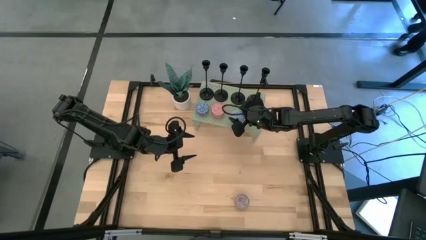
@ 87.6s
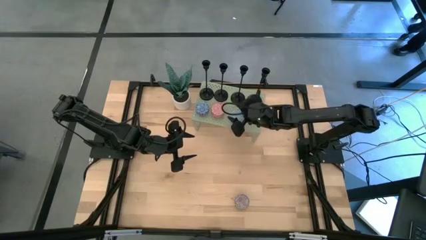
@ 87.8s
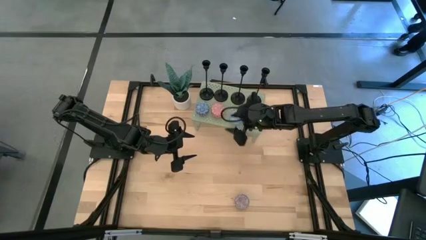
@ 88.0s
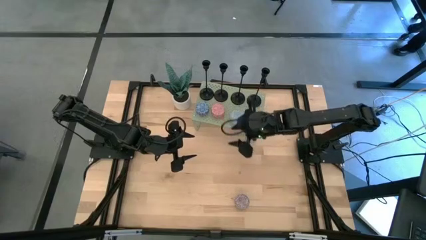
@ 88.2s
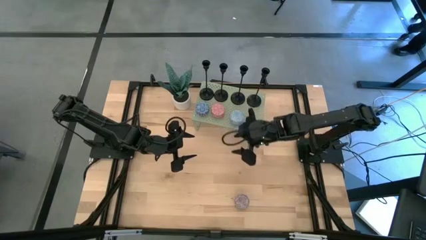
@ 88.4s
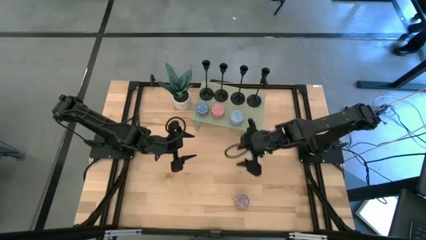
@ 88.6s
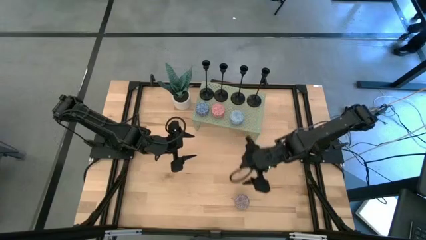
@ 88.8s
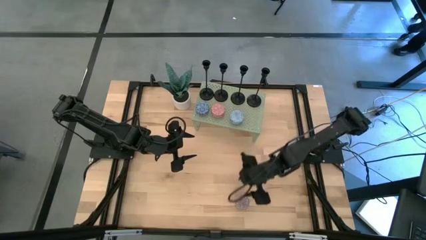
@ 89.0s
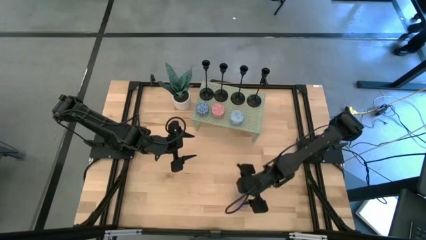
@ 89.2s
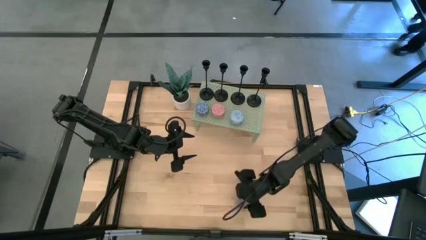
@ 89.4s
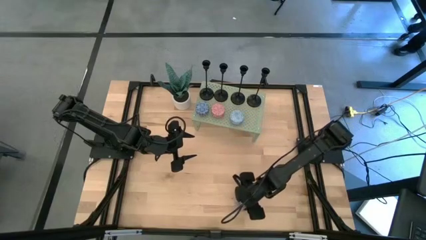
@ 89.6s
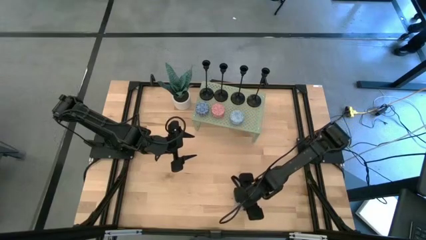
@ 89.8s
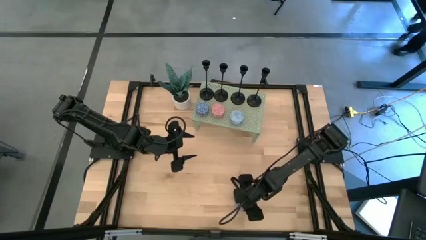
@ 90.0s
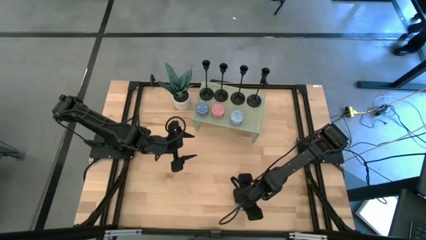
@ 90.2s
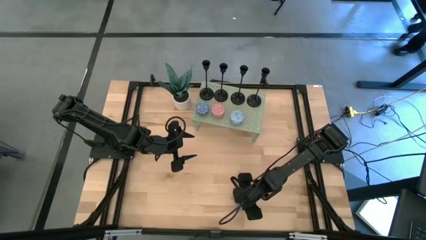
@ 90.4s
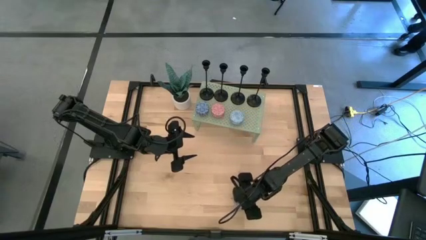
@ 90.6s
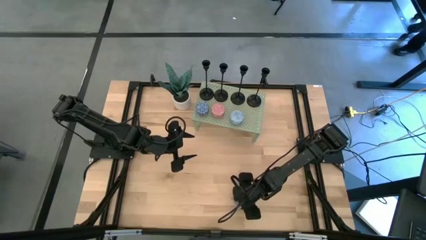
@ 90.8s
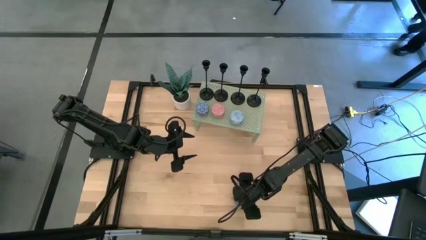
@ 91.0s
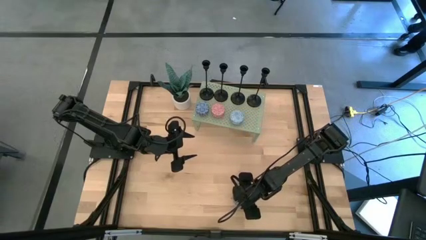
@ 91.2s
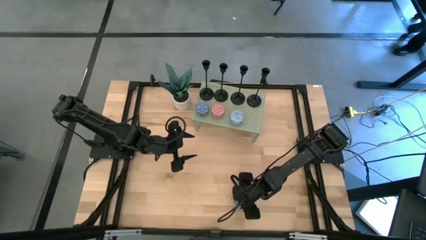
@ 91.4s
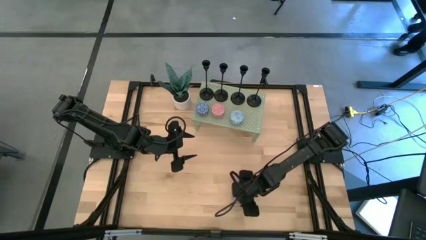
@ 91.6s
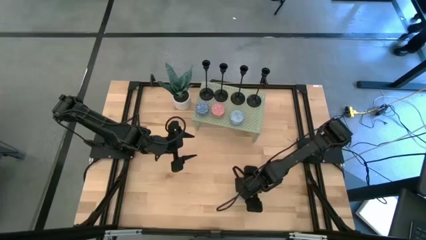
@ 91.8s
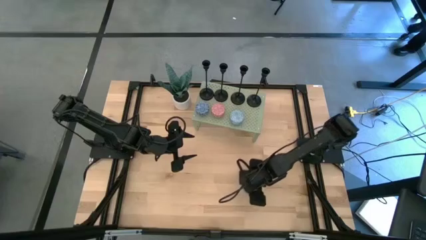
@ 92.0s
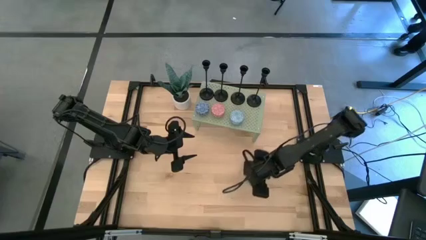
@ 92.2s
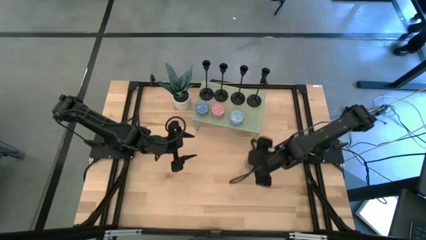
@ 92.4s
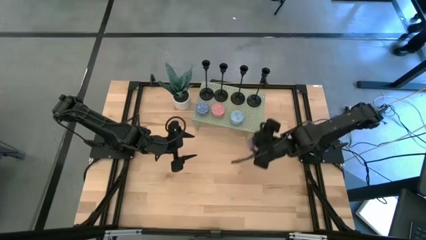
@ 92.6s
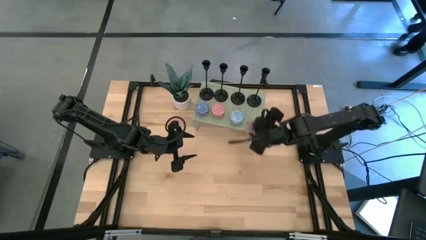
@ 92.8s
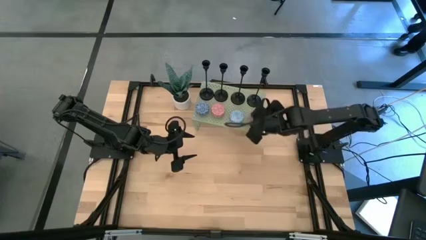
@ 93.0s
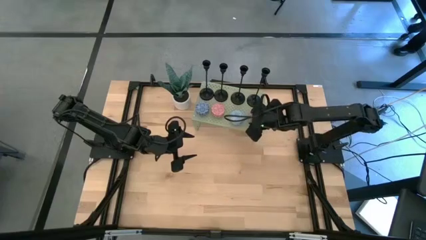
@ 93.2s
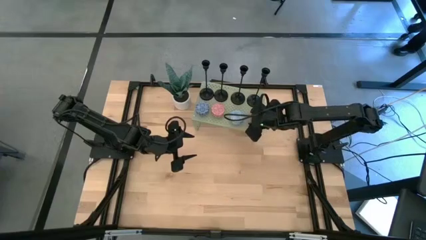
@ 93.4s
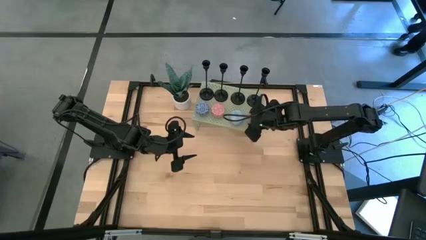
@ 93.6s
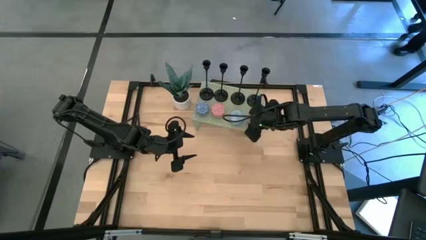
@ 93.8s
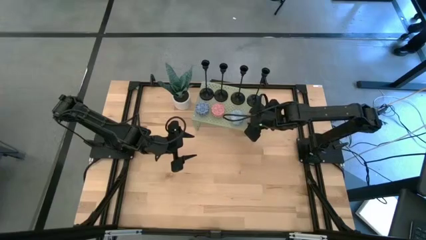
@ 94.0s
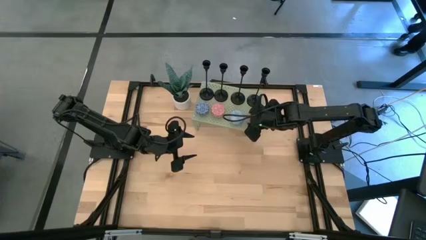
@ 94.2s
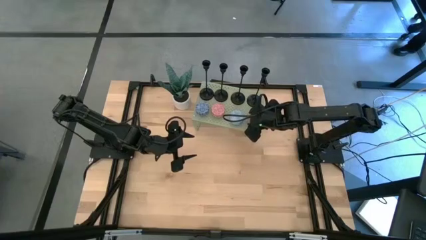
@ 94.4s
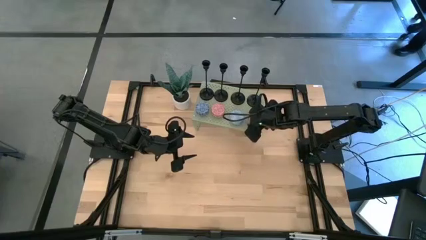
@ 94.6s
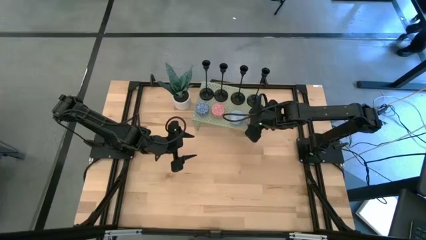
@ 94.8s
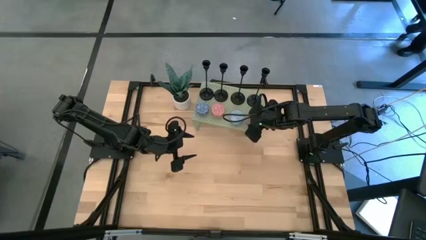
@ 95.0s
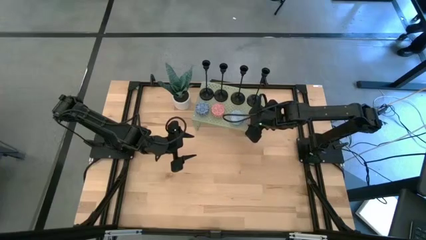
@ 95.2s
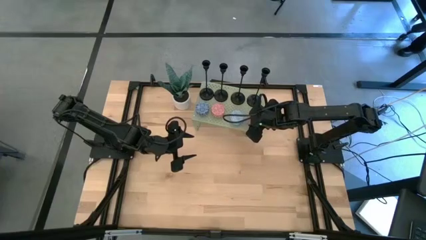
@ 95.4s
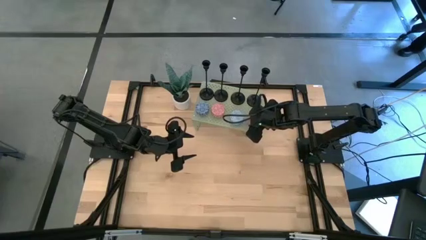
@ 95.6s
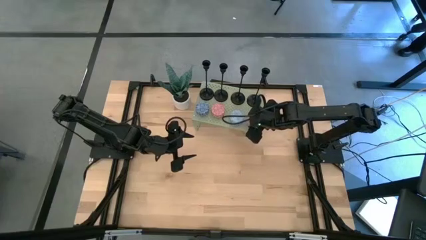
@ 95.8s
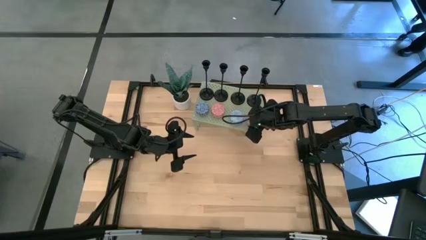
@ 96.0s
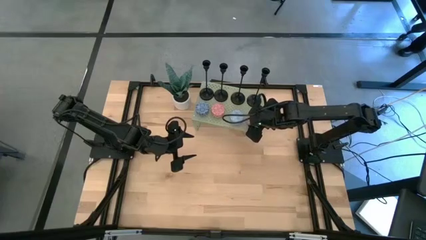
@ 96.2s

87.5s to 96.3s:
Task: Pick & Place candle stick holders
Put the red scented candle on the shelf aligned with the other light blue scented candle

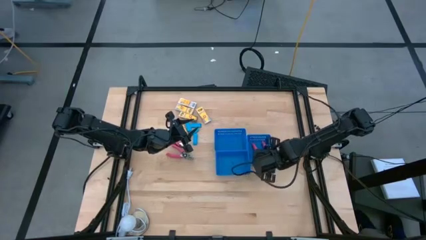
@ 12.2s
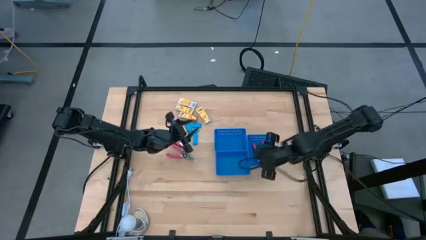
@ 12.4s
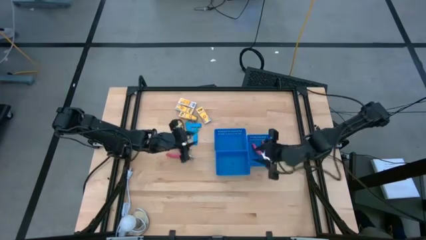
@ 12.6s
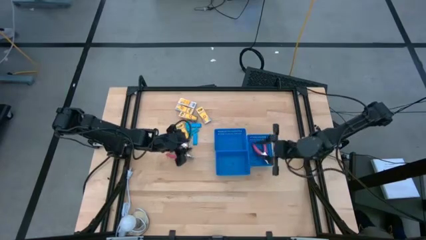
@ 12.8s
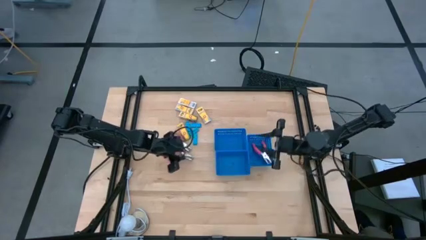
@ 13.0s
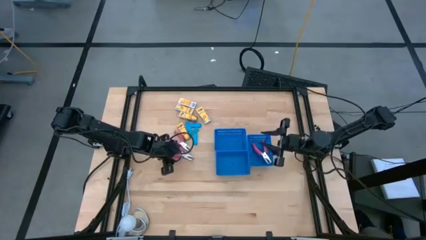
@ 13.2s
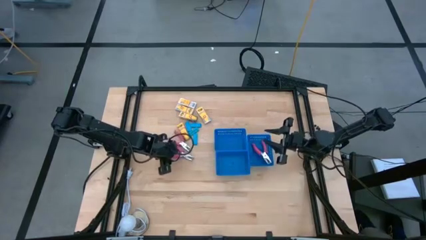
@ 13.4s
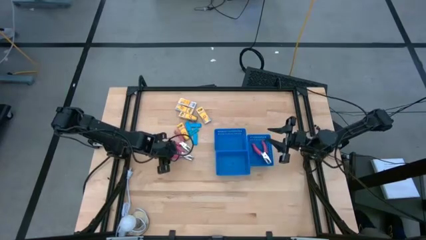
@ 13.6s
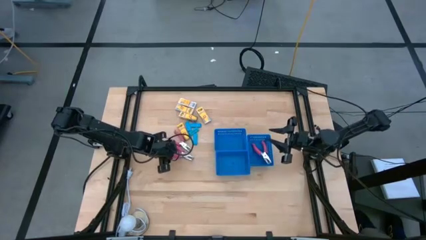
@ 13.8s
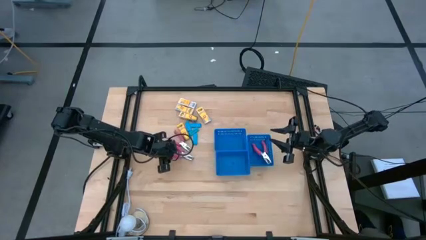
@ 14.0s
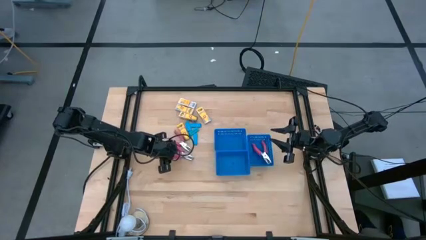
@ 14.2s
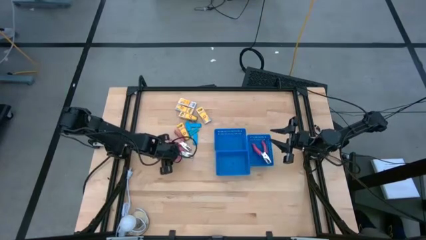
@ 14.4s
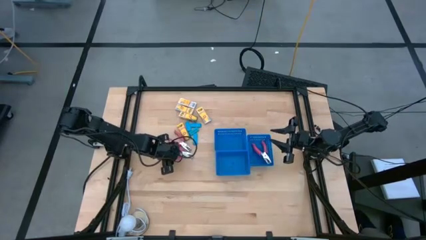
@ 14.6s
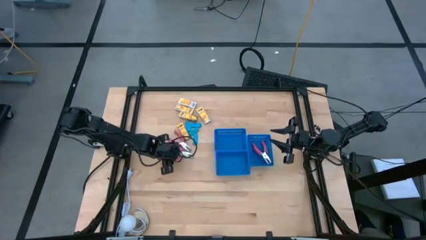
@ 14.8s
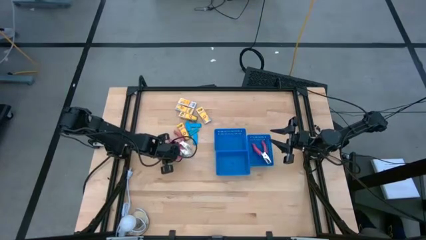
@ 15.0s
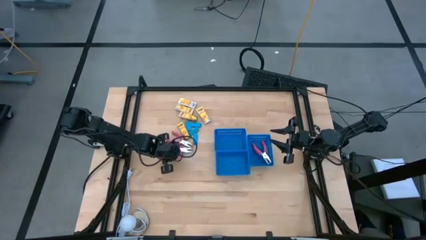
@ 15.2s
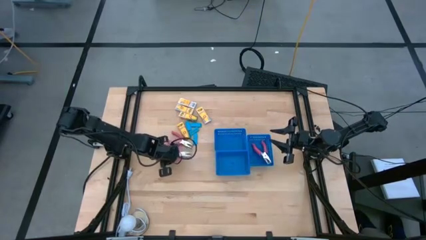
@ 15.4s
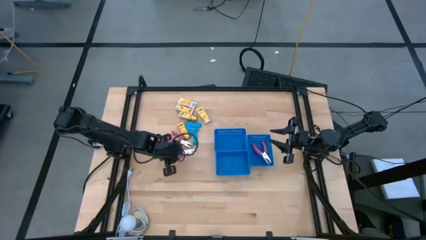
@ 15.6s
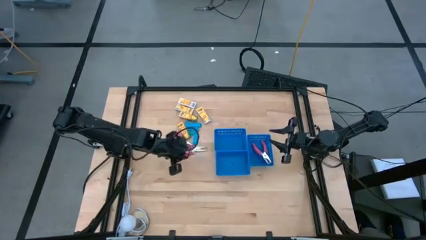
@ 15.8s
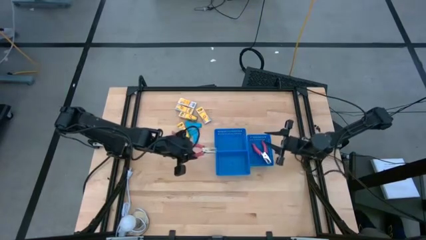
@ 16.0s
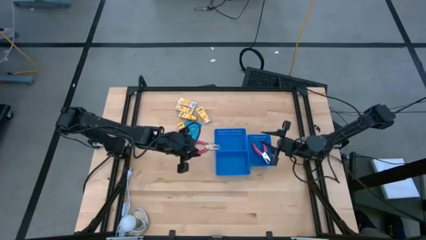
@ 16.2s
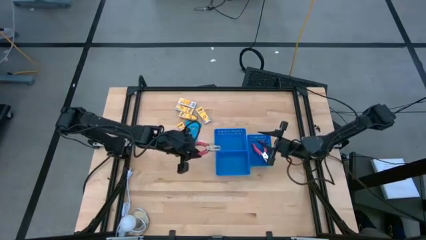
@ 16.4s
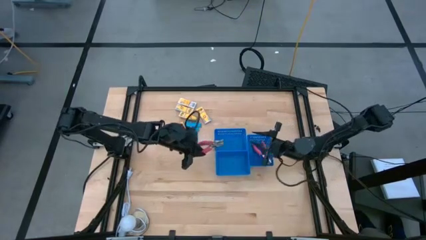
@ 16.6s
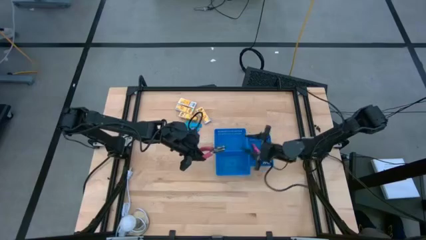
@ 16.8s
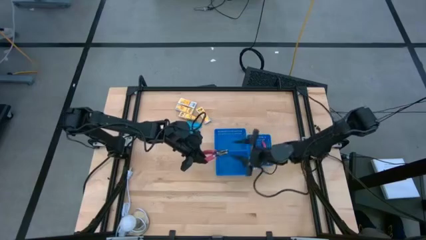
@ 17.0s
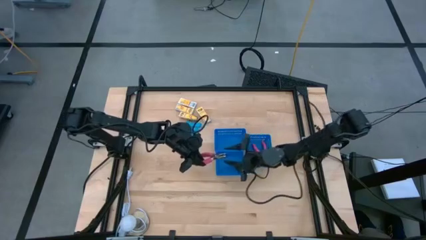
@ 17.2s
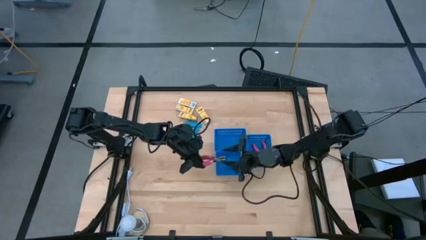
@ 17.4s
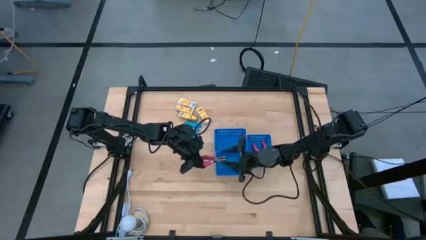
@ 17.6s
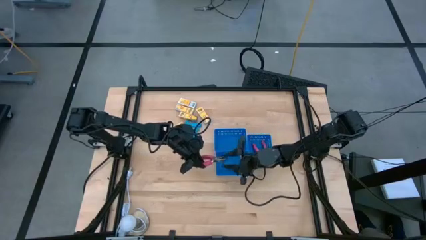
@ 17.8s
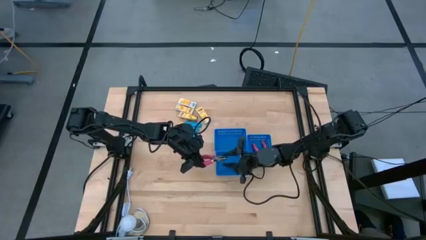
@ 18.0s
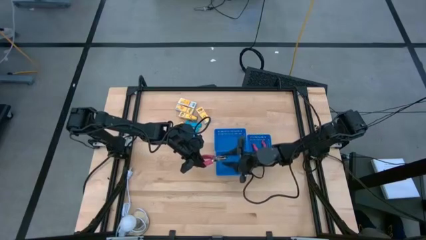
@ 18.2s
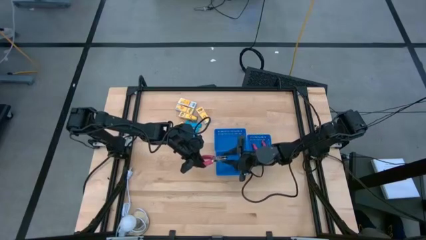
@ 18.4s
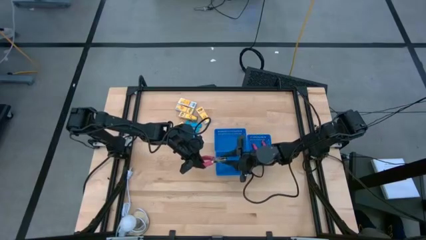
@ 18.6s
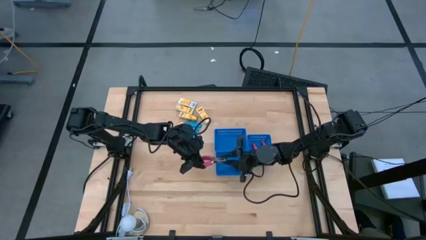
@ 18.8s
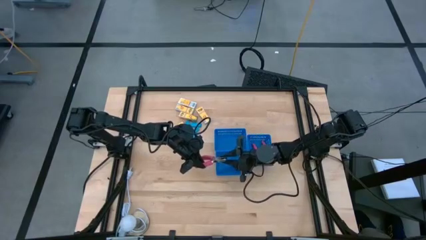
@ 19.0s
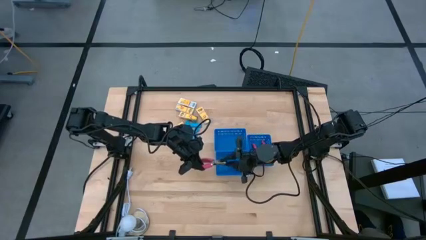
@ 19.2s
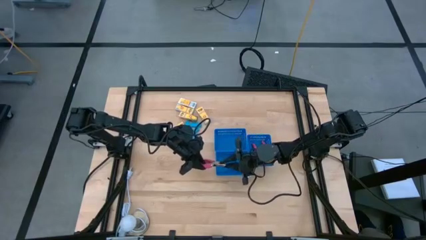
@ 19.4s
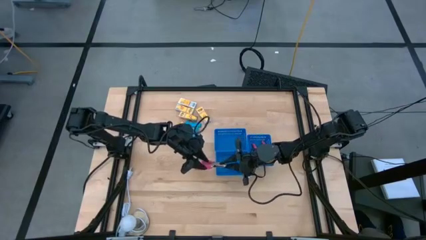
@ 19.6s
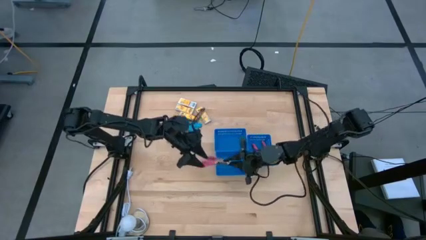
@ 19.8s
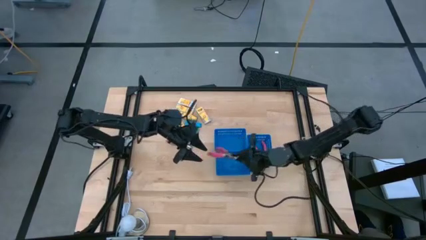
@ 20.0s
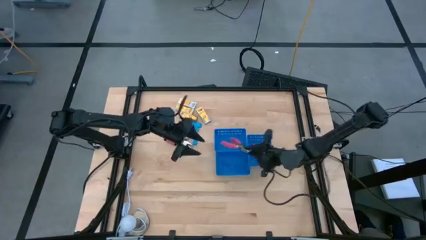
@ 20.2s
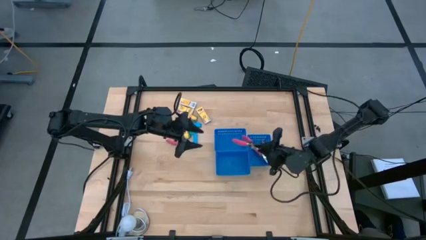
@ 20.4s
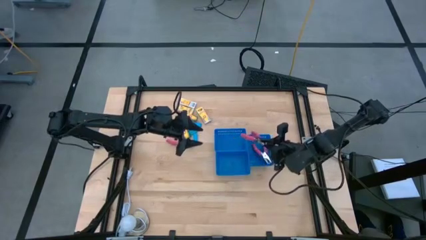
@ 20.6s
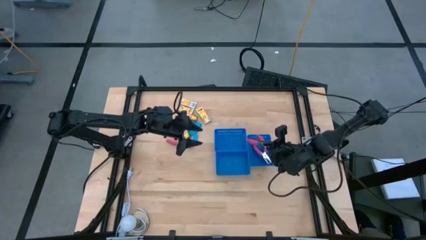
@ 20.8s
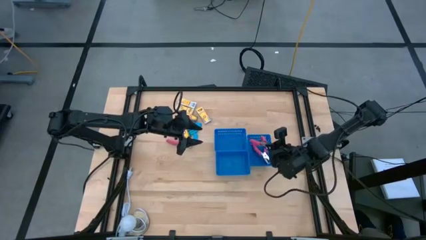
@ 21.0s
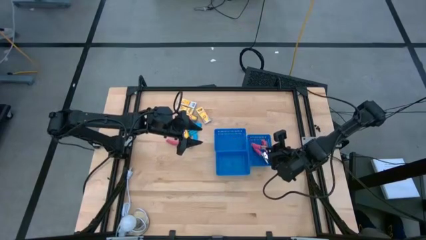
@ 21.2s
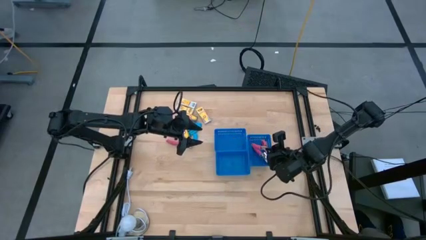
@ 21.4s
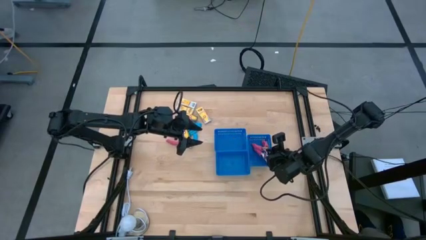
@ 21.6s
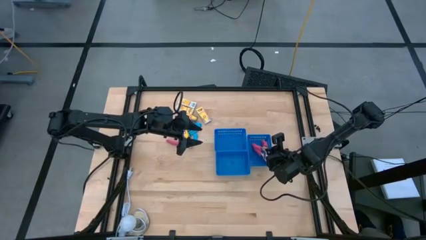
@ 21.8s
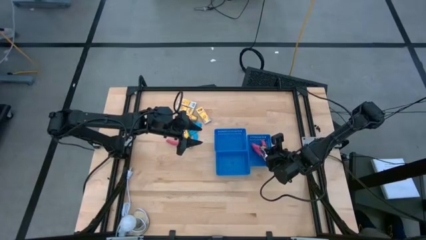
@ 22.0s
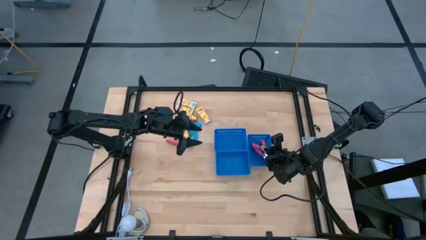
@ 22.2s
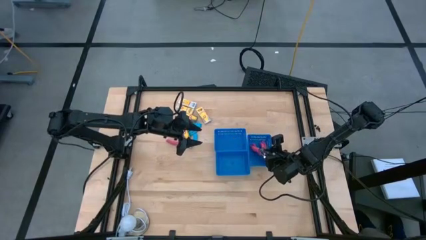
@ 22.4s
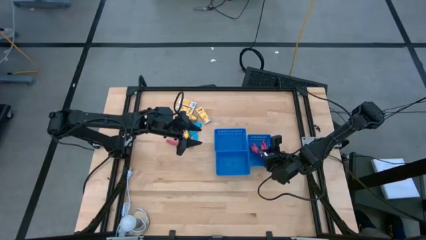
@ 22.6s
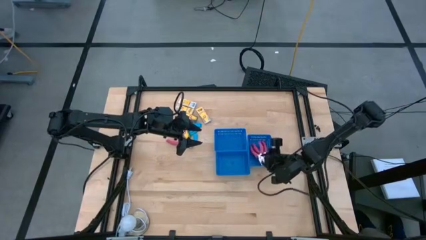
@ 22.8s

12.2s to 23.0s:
Task: Pick & Place School Supplies
Put the bottom pink hole puncher into the right vertical blue bin
